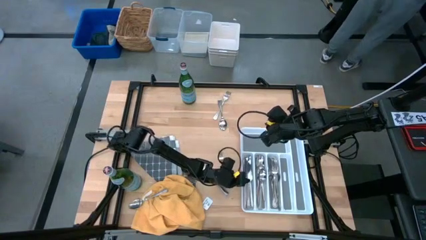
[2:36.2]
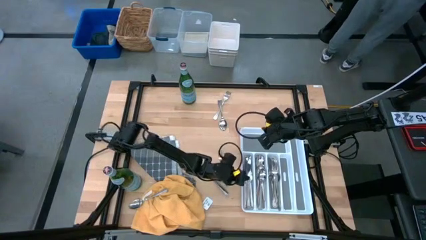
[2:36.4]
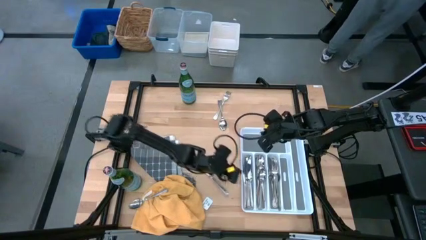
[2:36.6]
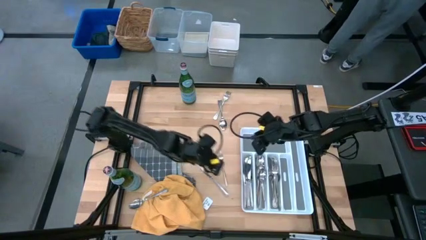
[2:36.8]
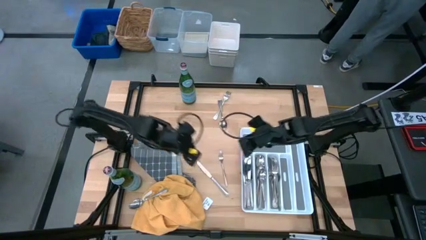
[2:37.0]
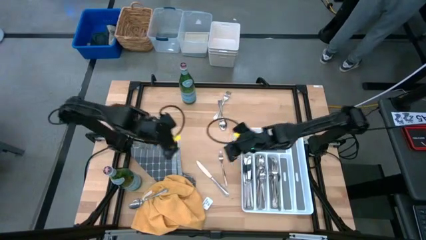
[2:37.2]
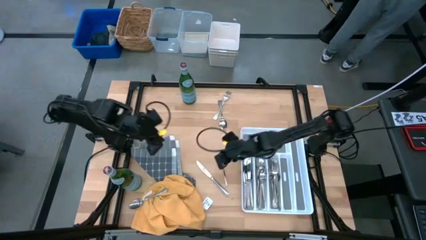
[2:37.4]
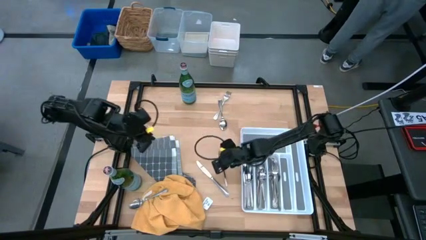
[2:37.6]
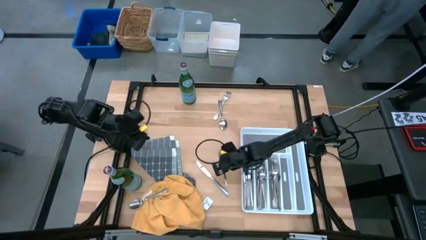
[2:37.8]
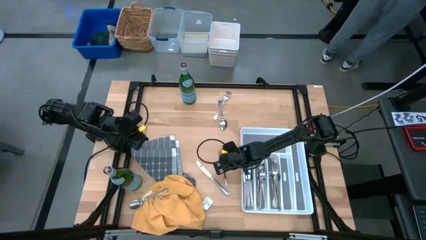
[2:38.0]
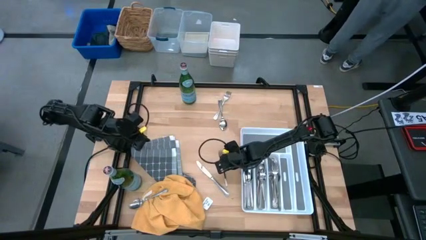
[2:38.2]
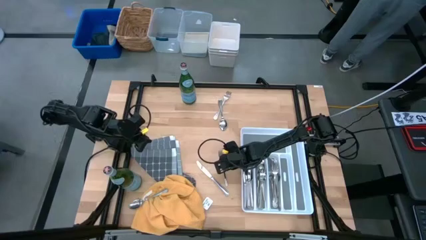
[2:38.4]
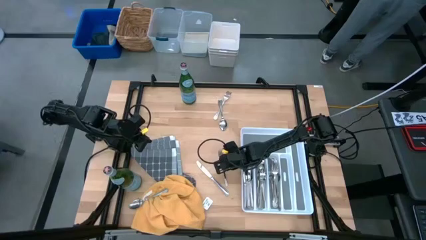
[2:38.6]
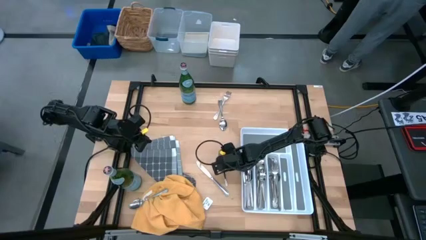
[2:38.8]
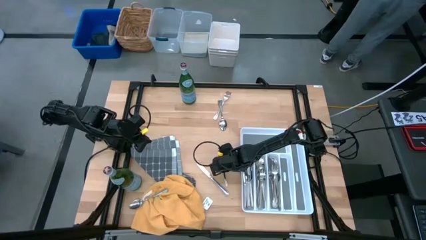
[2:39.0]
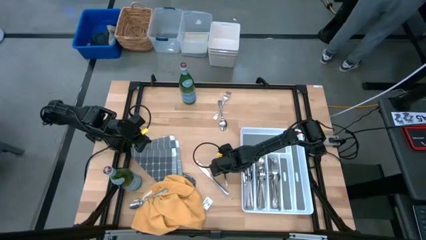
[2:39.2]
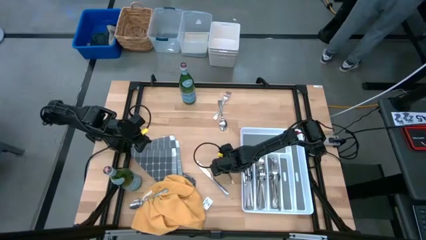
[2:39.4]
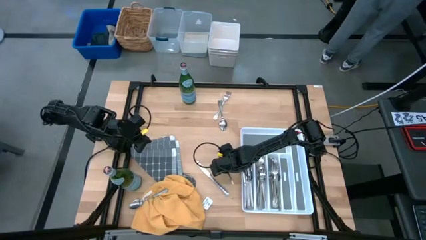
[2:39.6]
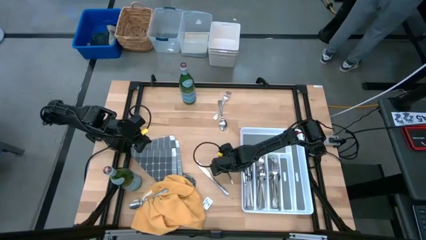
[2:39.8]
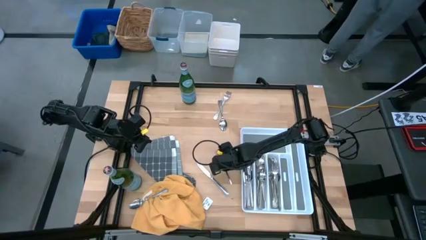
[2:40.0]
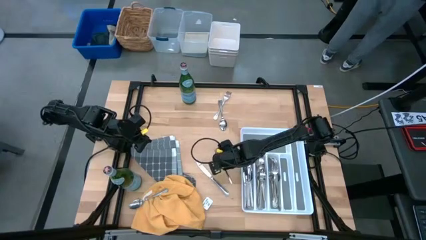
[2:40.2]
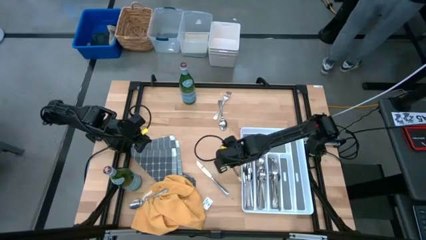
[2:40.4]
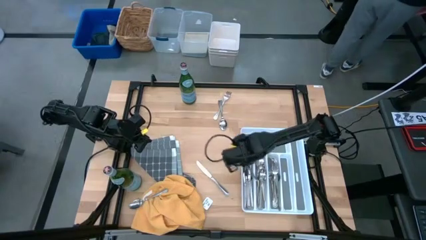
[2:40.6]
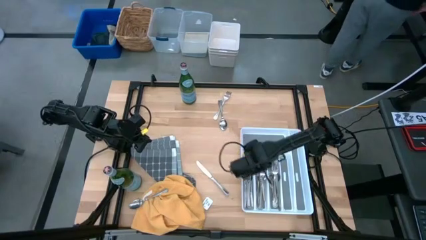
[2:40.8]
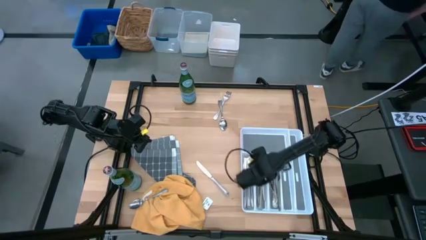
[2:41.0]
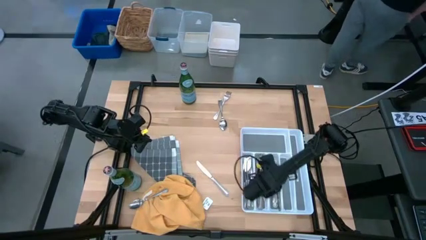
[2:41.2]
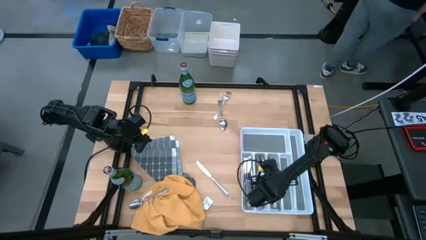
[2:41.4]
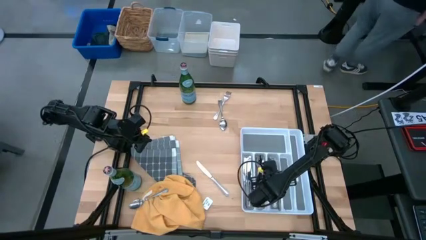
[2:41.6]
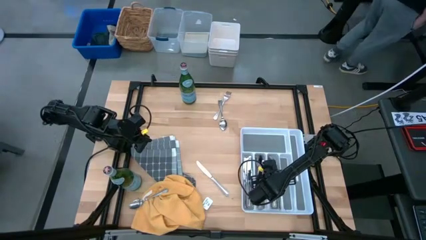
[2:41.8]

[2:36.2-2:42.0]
Stack the silver fork into the white utensil tray with the other silver forks

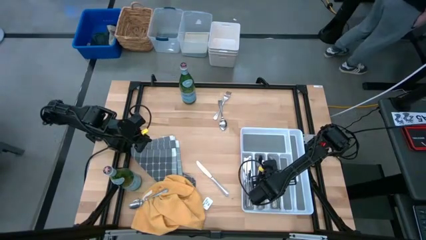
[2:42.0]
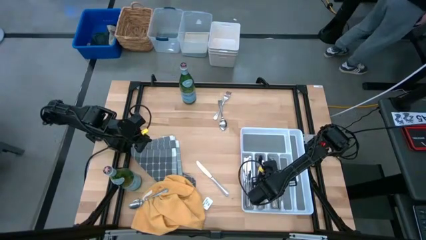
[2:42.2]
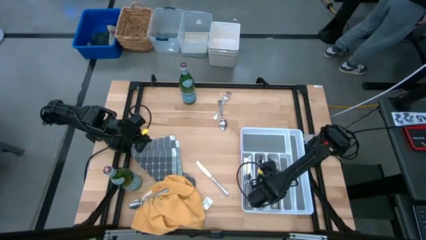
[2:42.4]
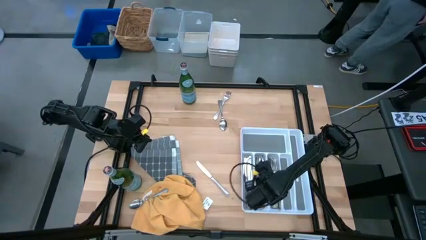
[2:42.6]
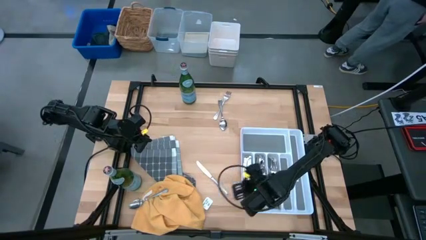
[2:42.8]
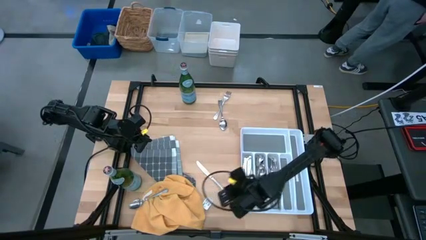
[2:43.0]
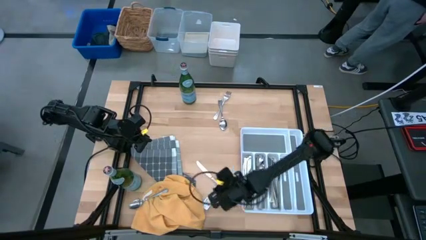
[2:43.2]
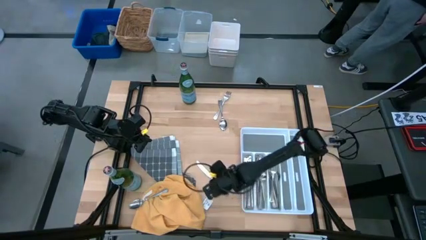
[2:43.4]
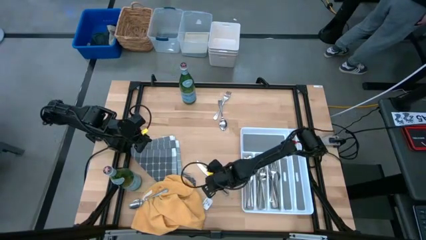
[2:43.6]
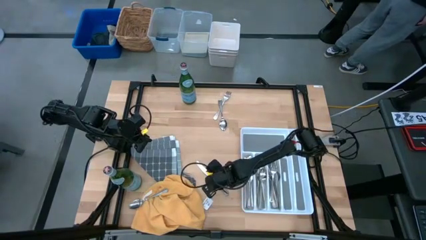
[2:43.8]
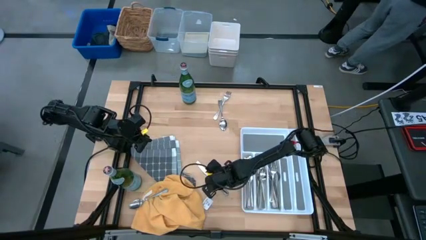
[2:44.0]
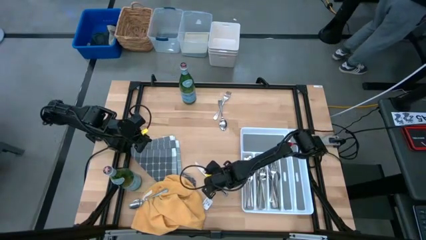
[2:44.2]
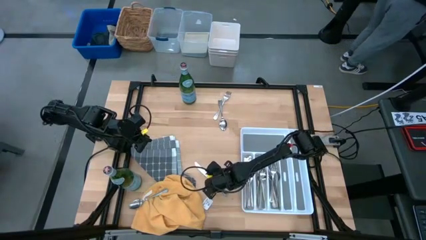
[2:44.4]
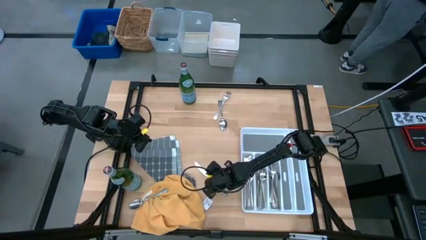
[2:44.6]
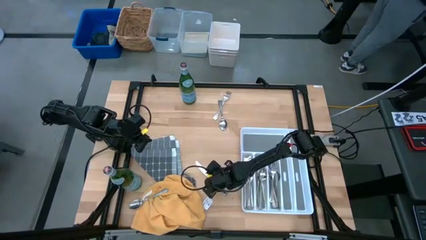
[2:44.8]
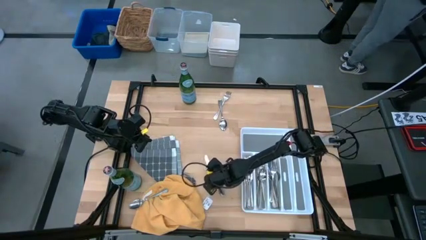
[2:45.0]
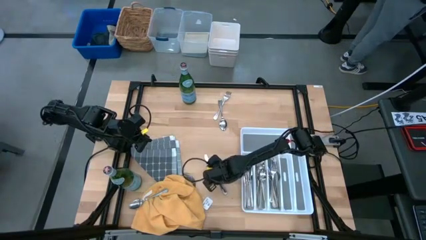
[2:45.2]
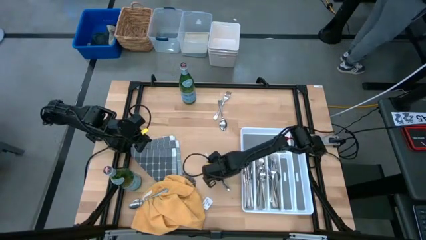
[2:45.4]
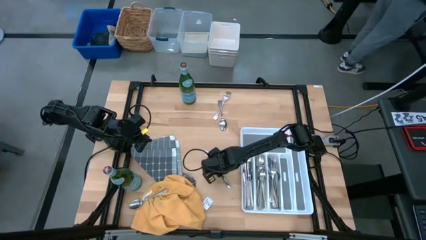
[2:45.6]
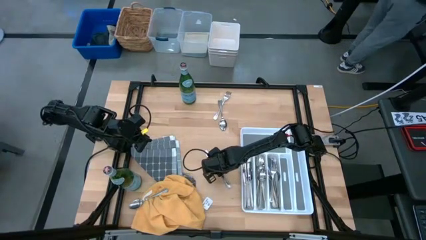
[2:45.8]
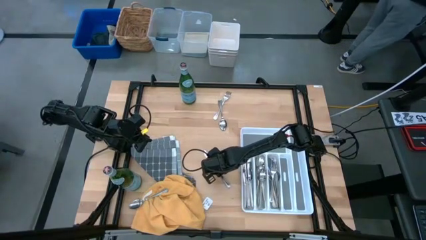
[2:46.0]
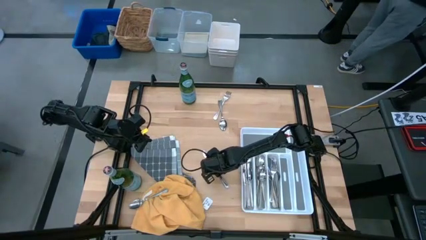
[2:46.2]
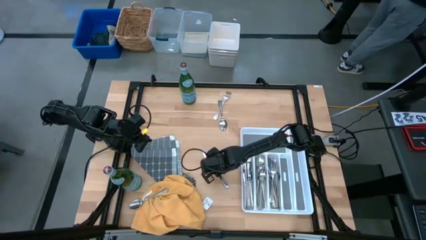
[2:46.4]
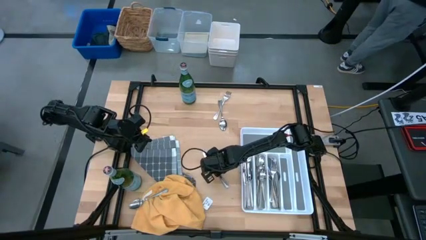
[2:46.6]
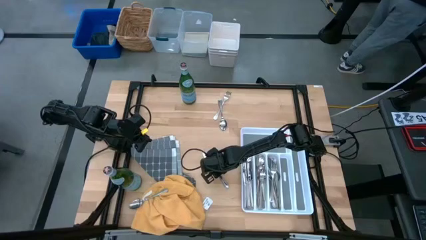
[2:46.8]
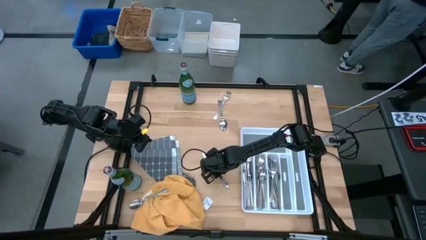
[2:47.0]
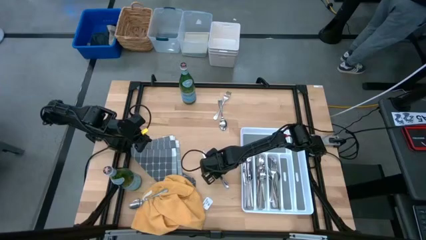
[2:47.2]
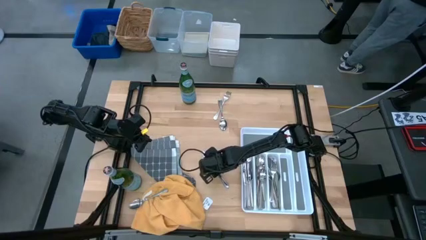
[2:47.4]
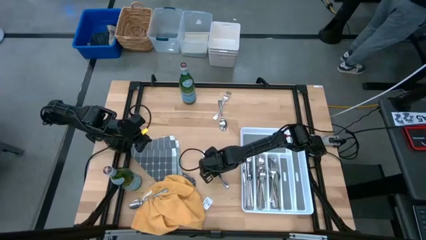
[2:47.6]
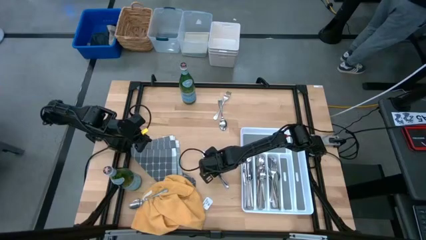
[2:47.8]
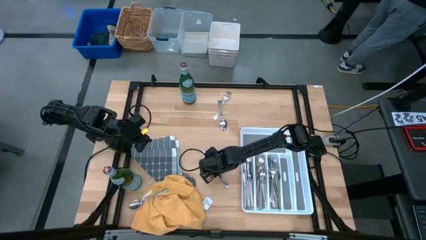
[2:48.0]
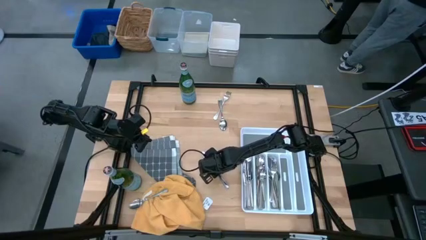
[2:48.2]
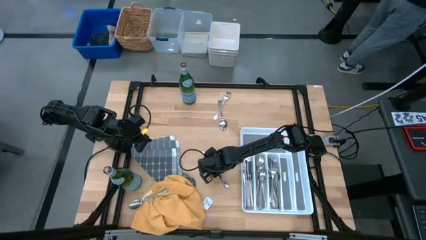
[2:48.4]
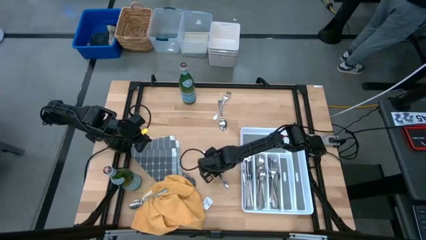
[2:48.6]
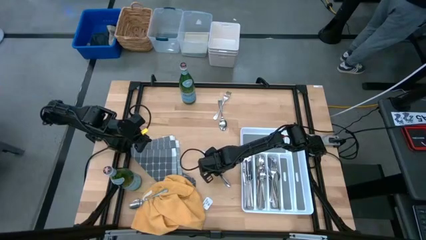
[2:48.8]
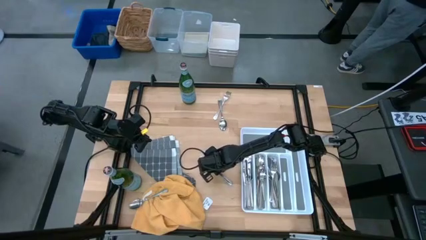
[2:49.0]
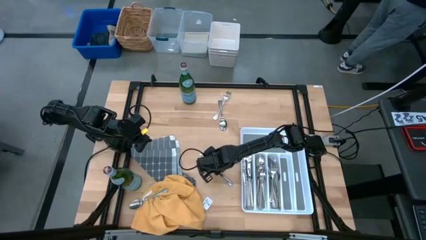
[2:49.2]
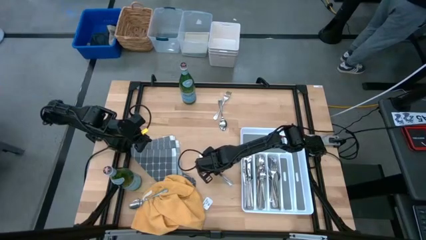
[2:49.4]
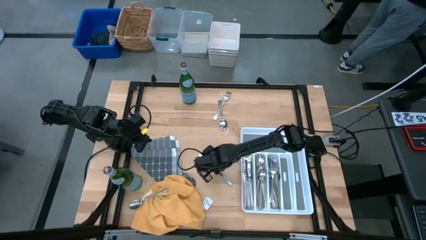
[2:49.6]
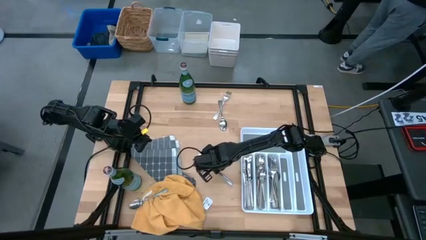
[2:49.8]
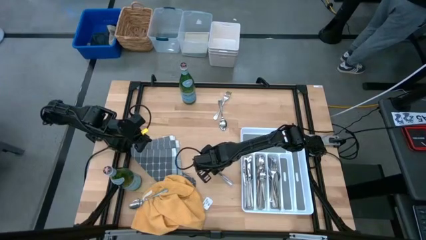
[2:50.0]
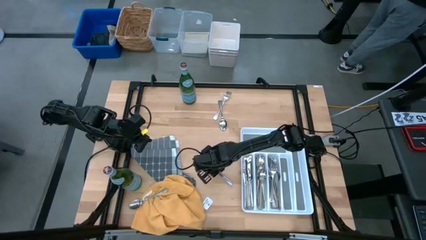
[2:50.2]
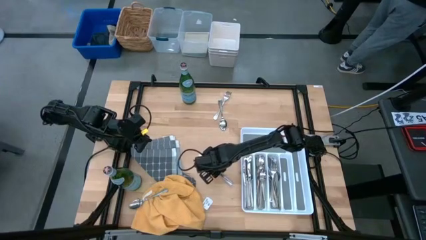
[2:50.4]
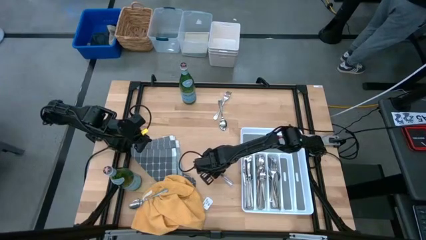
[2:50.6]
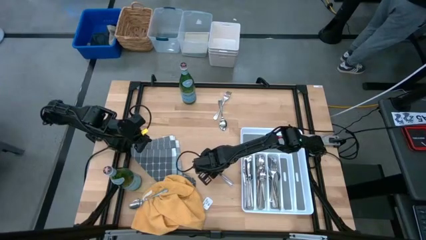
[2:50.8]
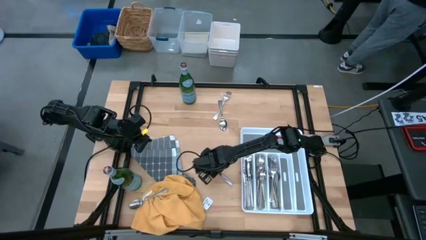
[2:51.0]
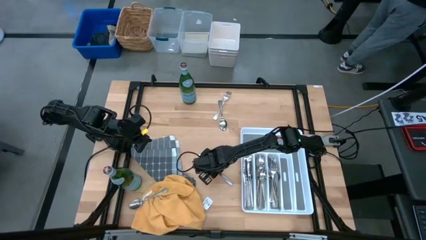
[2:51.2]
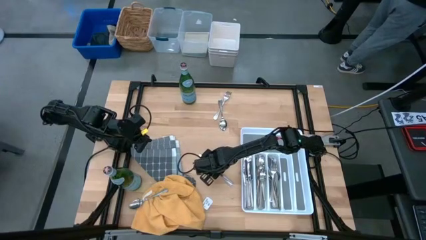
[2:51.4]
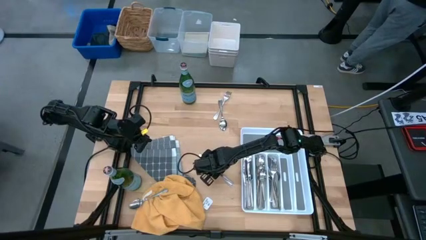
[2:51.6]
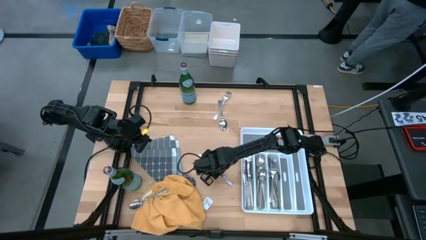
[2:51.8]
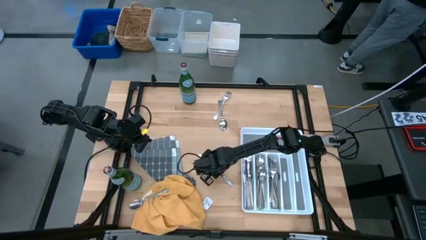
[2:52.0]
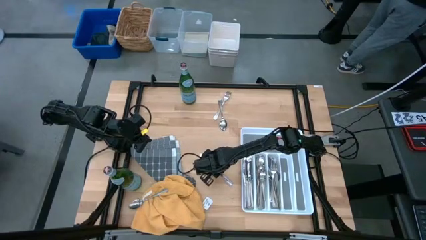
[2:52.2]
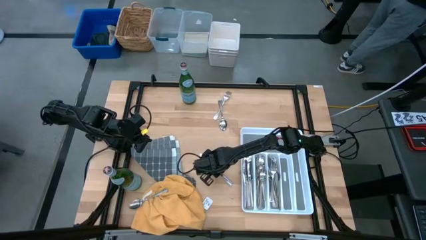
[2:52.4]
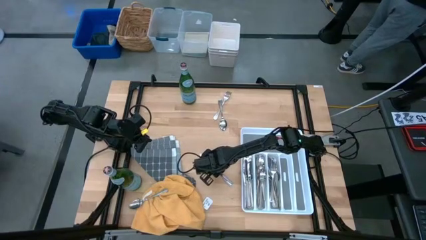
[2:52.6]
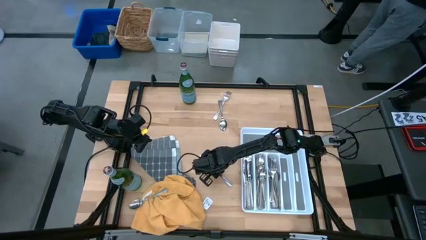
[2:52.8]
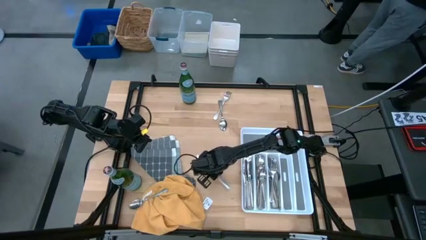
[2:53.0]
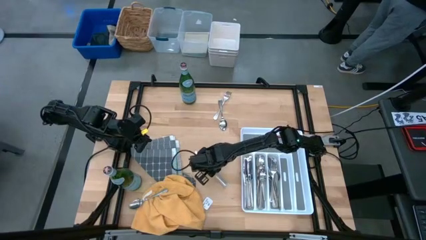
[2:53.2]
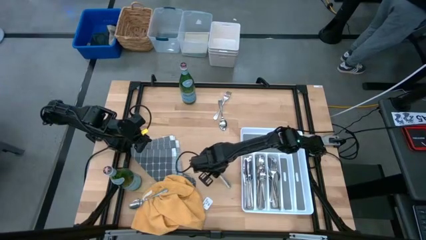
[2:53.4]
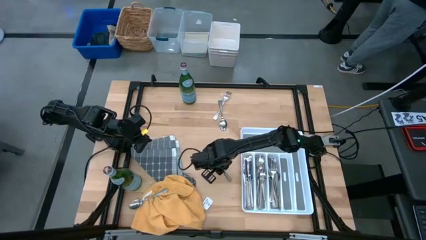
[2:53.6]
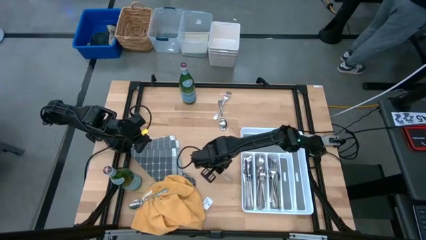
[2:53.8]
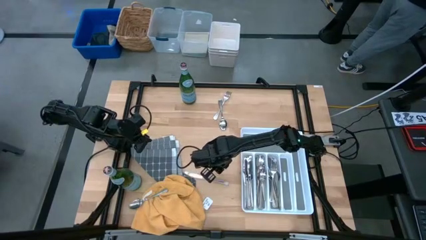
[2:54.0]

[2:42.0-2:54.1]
Stack the silver knife into the white utensil tray with the other silver knives
